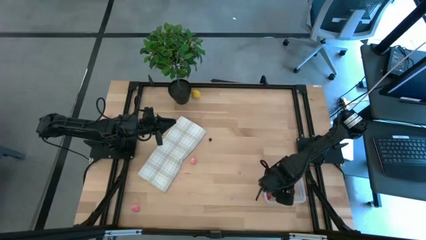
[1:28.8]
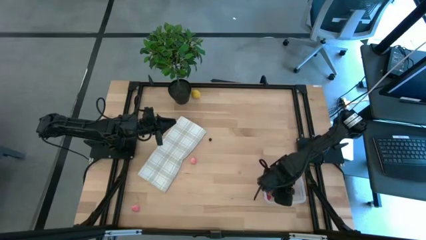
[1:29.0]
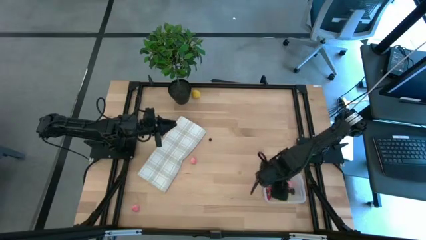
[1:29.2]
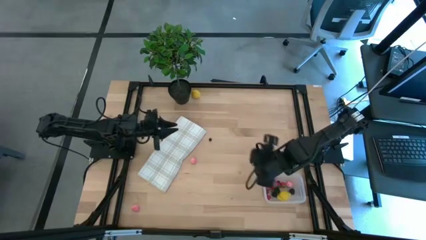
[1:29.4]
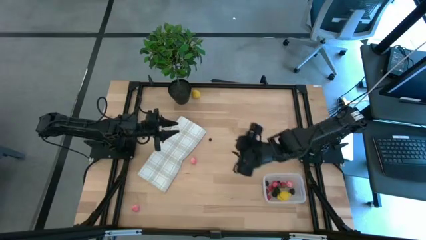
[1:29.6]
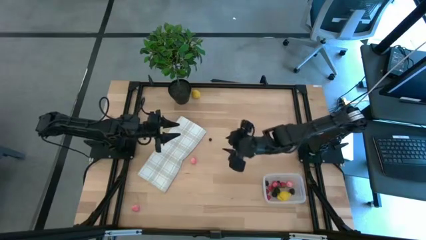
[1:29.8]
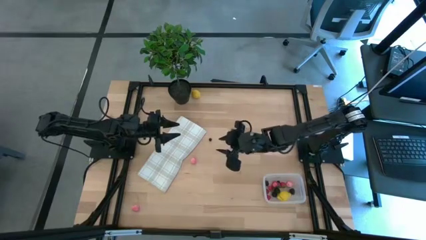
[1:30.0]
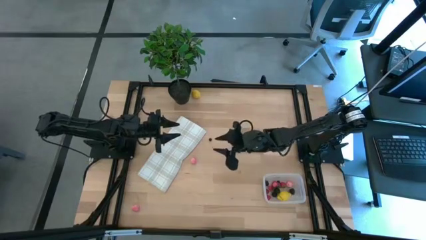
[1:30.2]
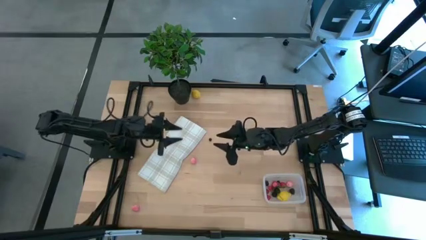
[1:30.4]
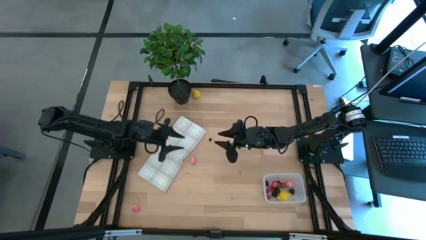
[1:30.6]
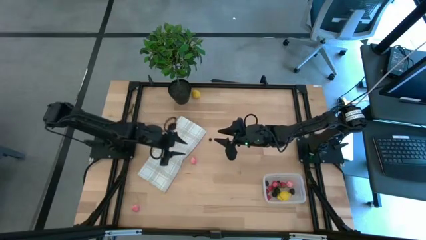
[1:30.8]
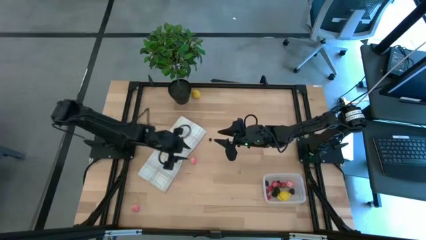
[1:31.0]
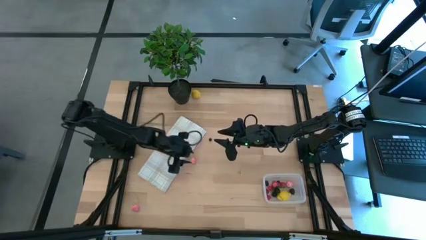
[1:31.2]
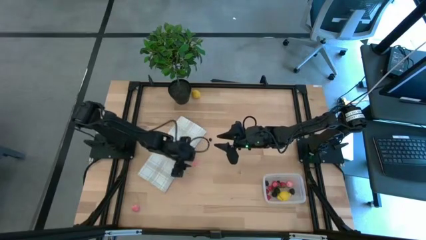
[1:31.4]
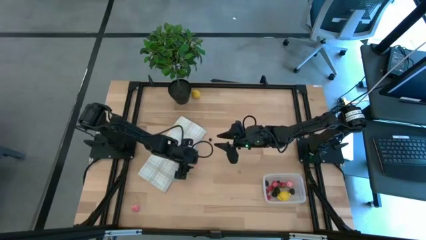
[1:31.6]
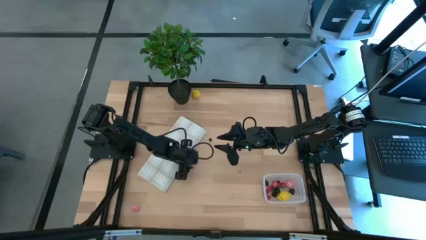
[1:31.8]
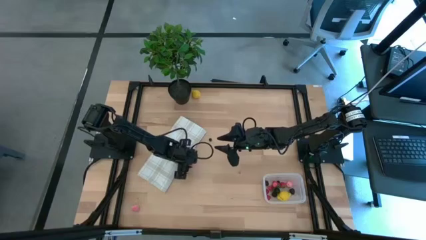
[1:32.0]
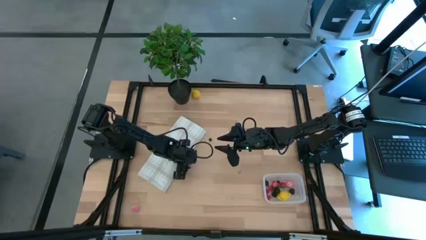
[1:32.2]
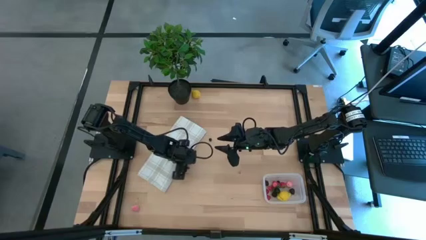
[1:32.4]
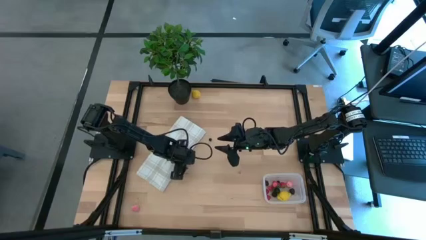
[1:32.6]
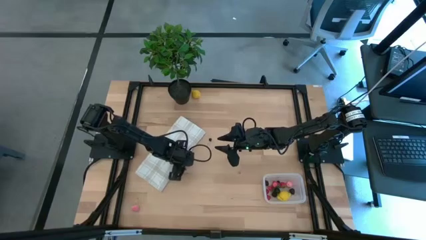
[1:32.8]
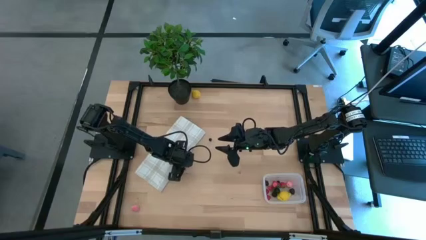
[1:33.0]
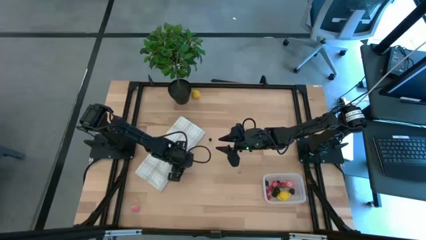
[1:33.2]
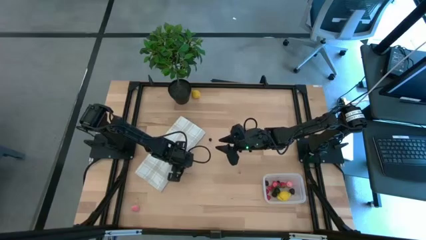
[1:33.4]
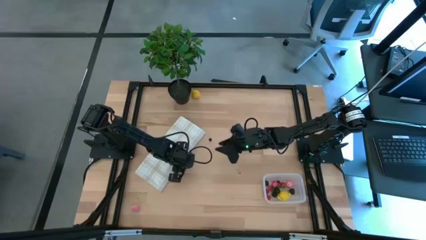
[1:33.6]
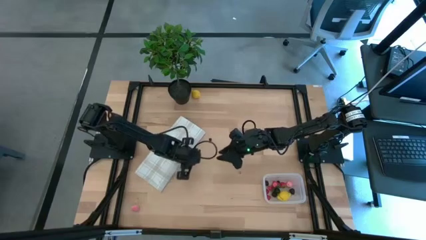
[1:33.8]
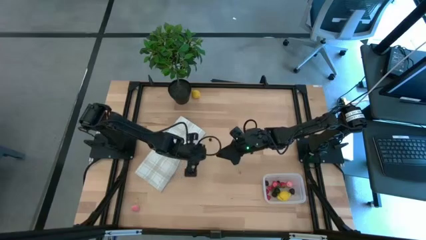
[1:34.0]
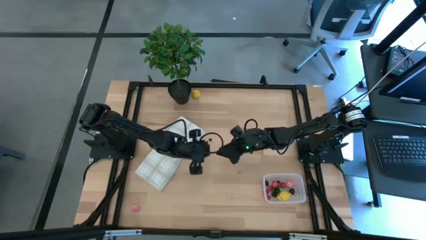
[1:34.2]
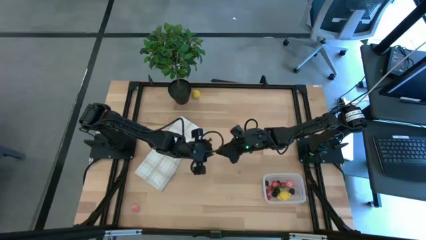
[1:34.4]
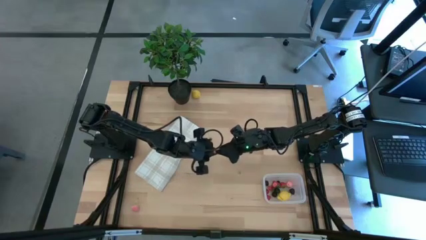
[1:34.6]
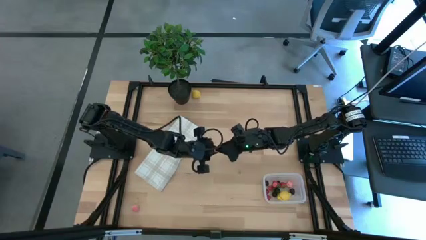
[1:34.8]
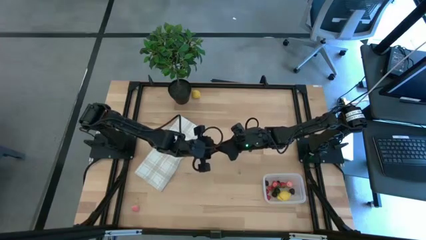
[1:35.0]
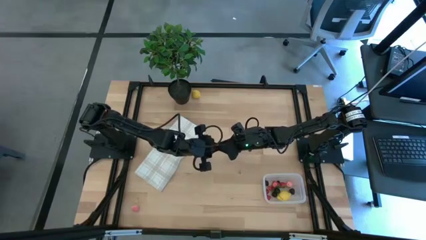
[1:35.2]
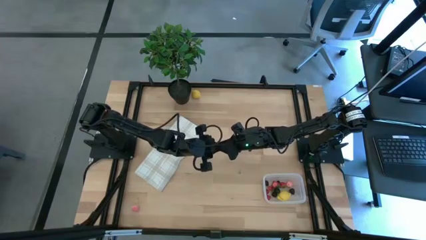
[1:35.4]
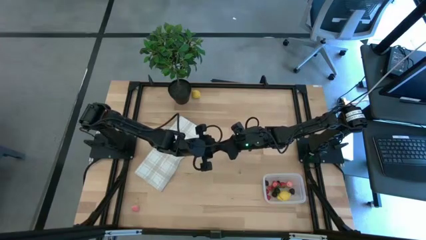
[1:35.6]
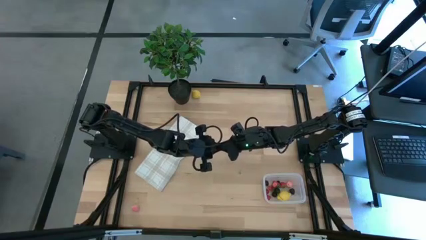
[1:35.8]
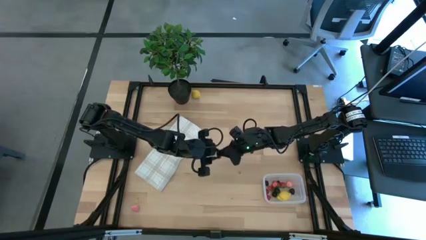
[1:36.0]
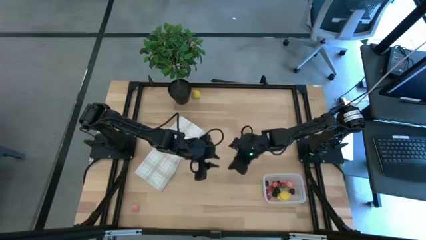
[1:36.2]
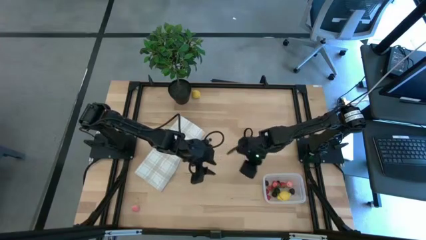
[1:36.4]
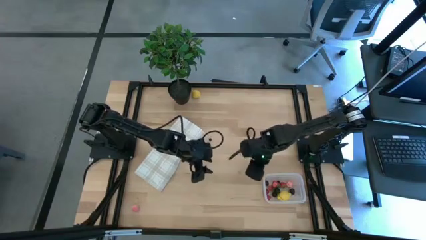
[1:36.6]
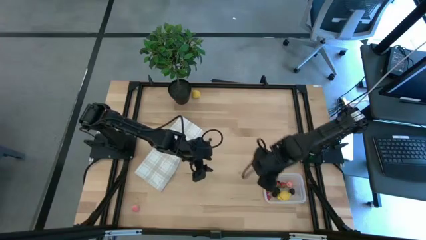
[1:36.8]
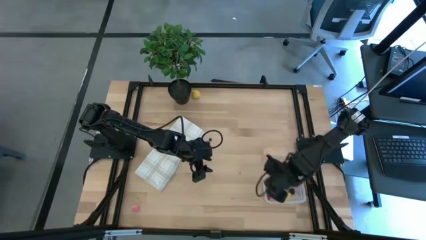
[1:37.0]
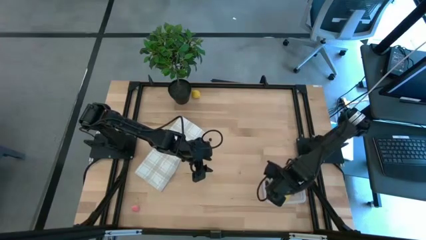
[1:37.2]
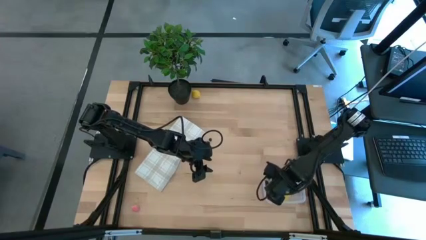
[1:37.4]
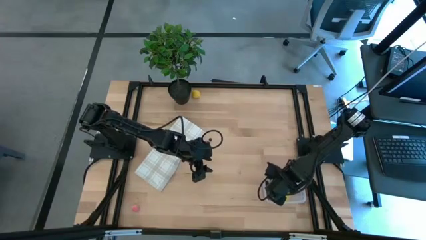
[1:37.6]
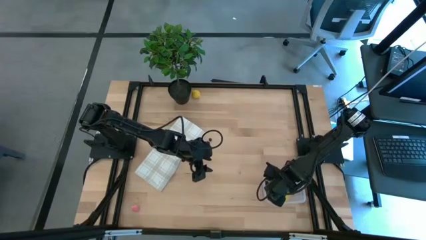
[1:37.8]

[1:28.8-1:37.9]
Task: Pick and placing Produce into tupperware
Put the top pink peach into the transparent bin

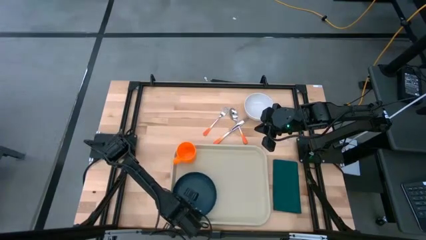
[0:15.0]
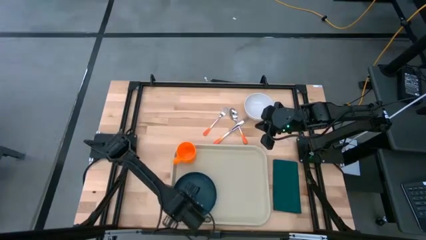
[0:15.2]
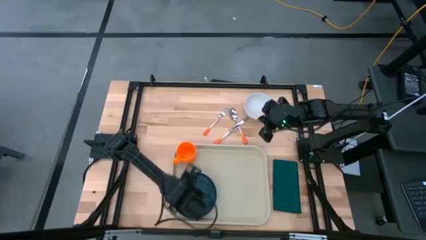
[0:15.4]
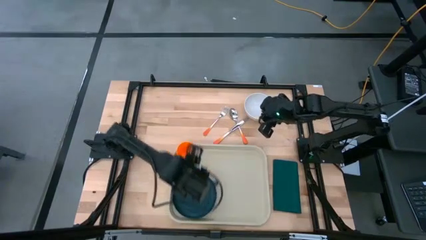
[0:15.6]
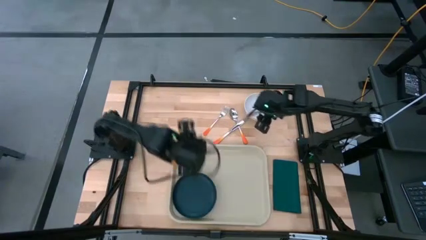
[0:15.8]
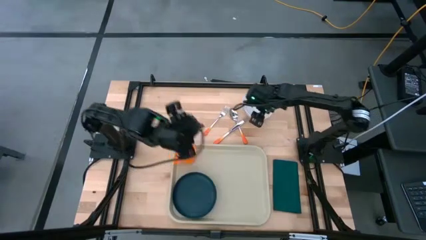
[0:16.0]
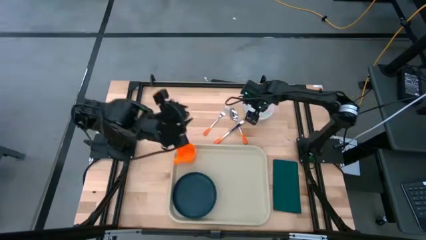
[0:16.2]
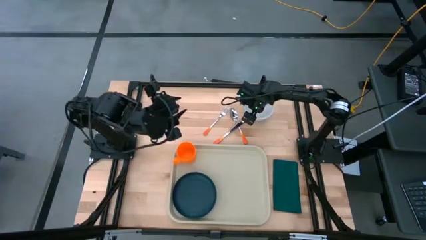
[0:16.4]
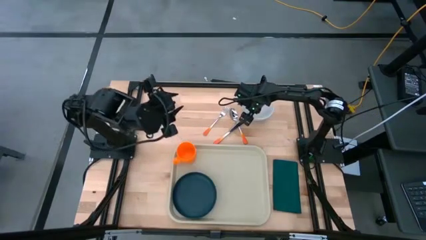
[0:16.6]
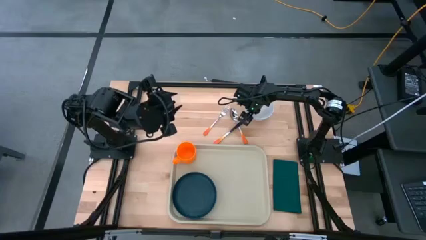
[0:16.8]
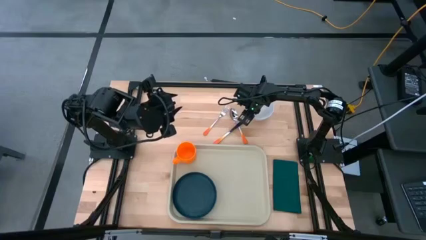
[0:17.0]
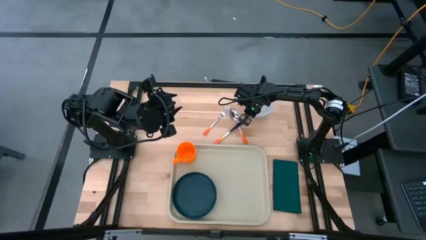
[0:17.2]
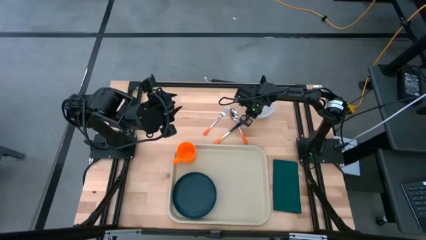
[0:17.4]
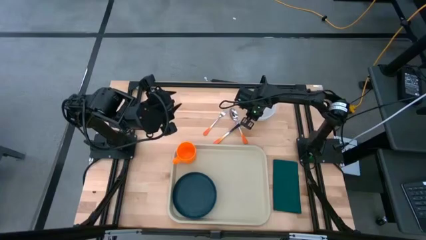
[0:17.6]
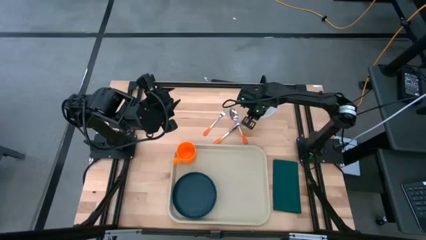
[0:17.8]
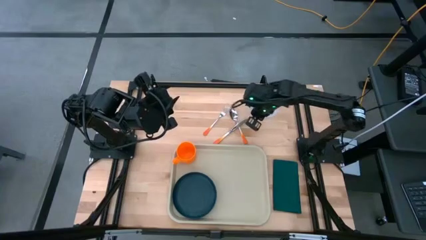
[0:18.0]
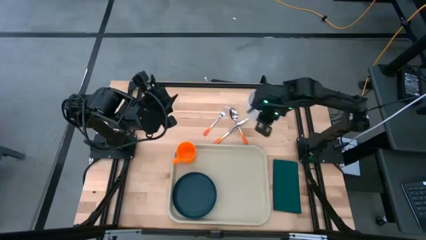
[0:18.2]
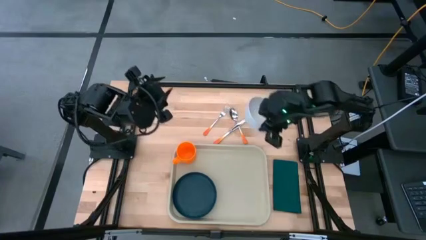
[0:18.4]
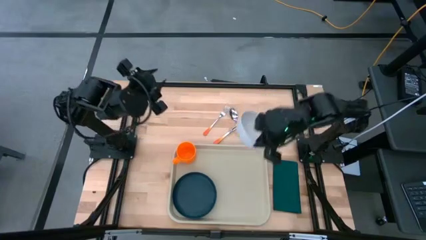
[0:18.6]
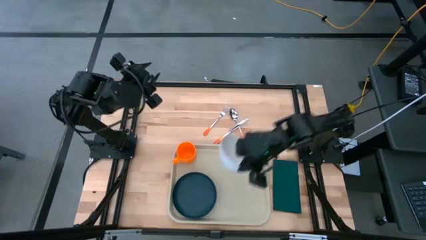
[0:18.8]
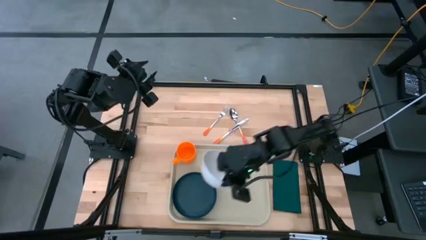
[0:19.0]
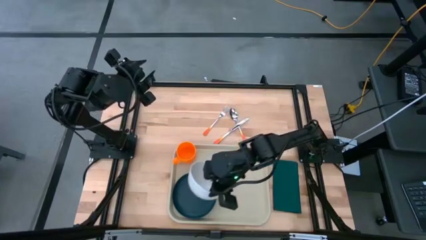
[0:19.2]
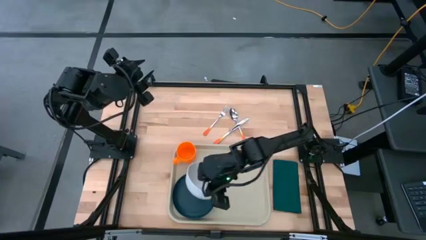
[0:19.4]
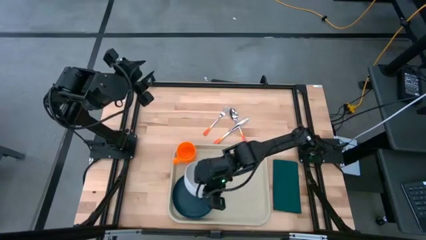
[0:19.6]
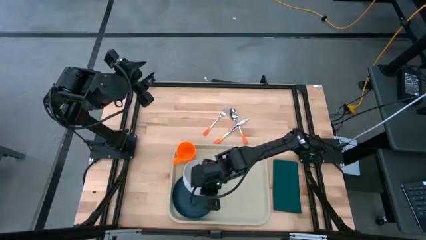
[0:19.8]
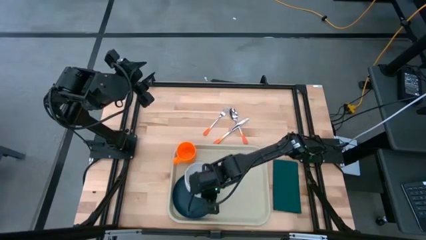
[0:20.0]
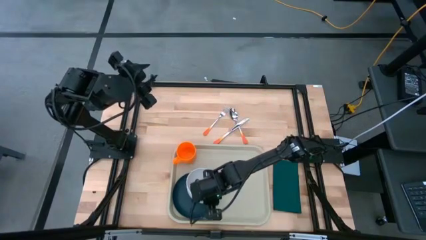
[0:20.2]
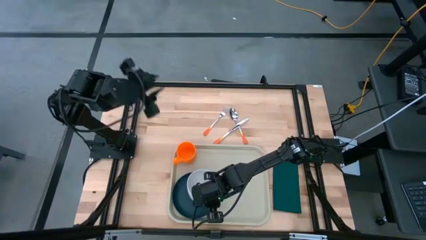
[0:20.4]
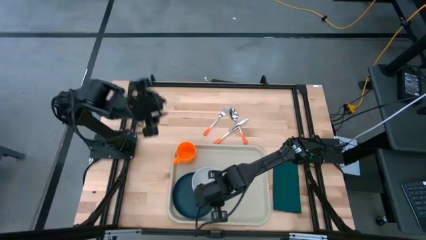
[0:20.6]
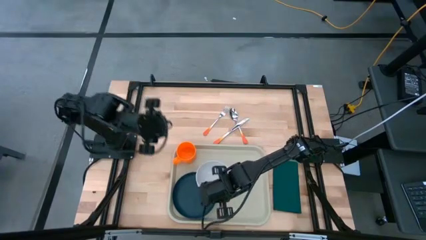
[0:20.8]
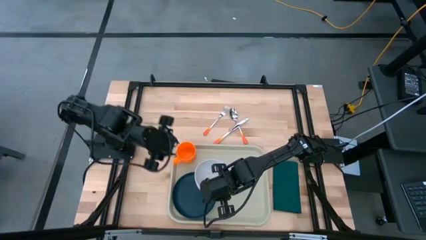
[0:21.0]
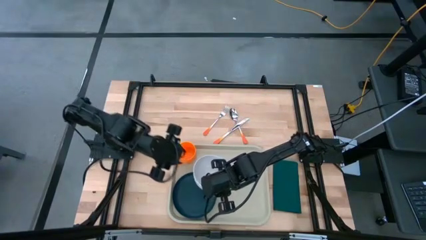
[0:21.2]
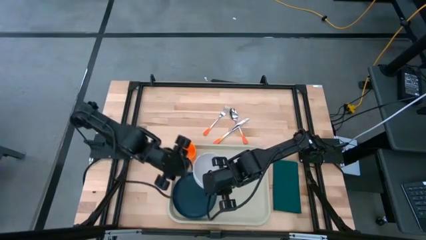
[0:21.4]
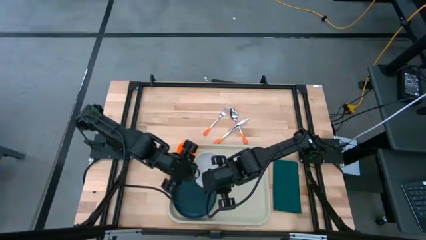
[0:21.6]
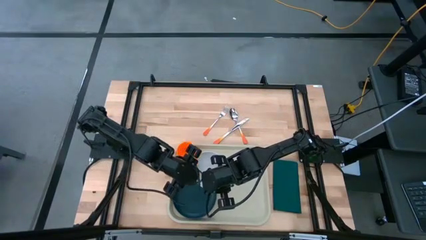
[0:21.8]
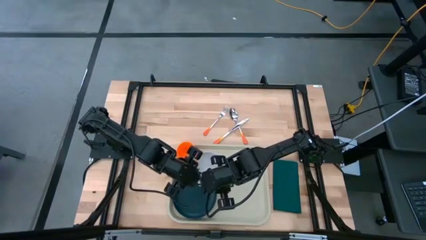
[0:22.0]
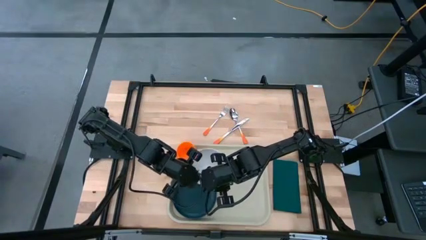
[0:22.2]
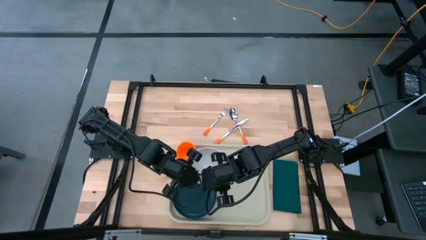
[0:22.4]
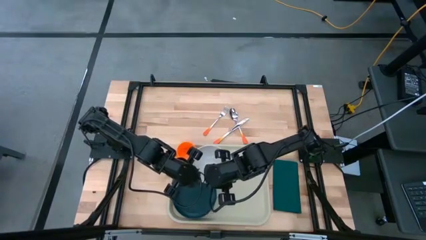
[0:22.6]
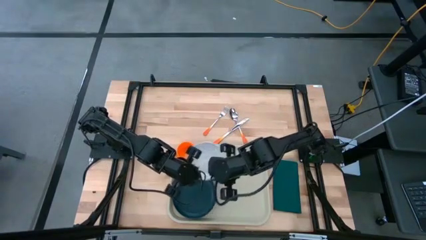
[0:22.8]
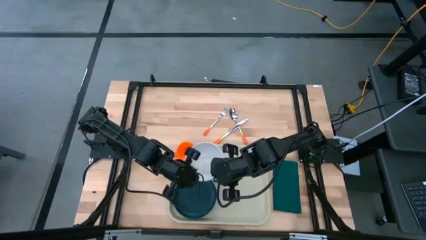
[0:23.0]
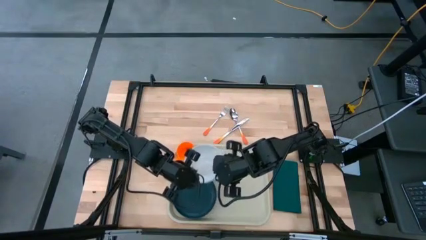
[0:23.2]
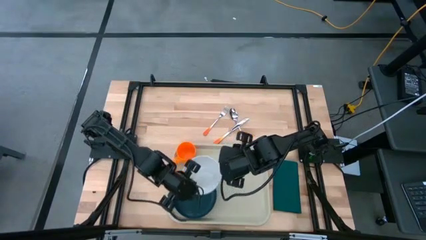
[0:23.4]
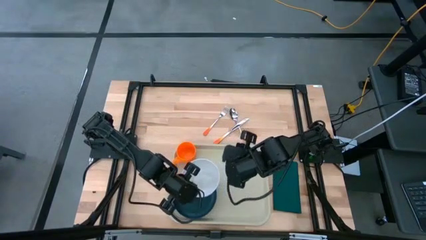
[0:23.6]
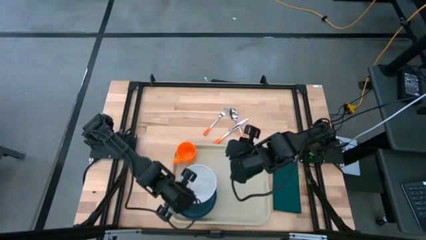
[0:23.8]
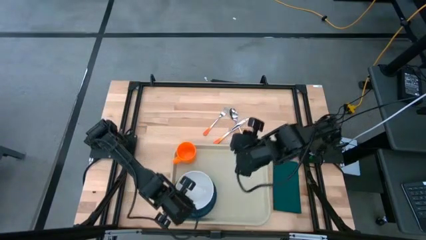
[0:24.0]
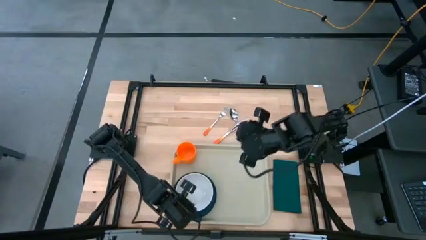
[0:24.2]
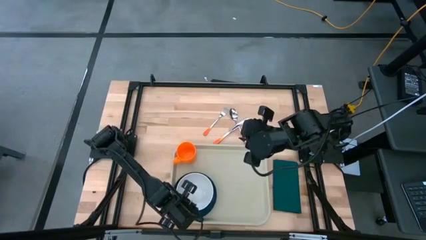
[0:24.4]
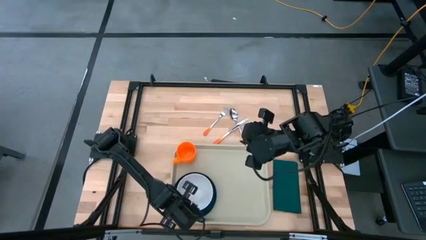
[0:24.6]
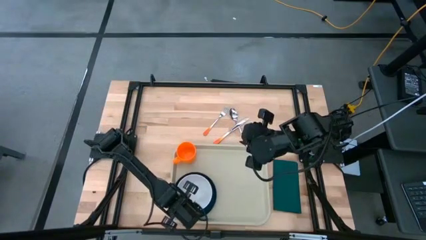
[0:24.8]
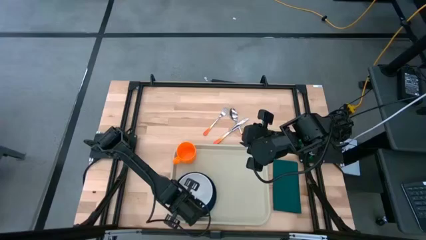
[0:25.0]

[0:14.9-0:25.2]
Task: Set up tray
Put the white bowl on the black plate
